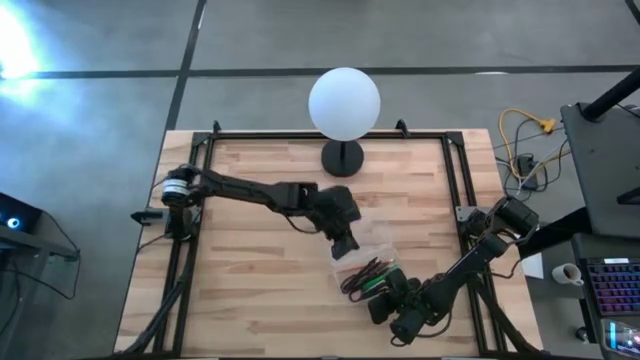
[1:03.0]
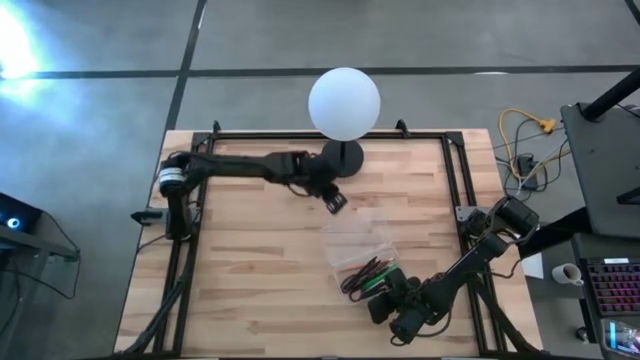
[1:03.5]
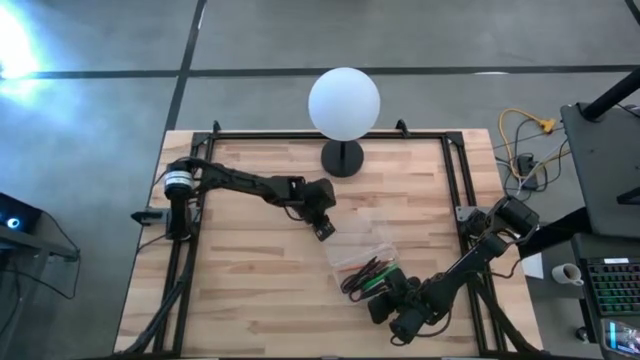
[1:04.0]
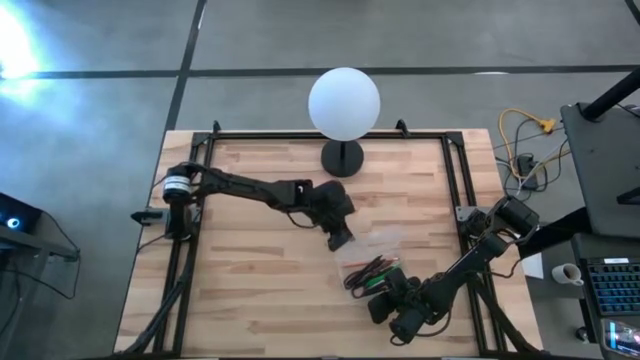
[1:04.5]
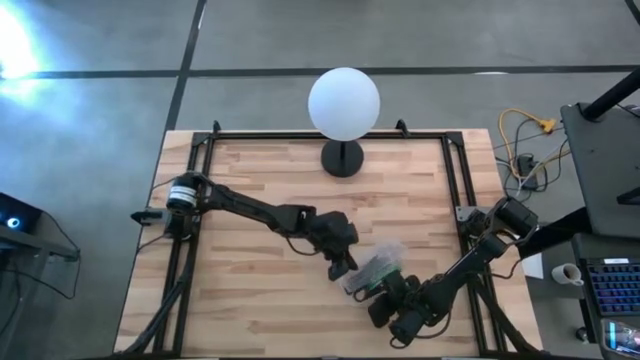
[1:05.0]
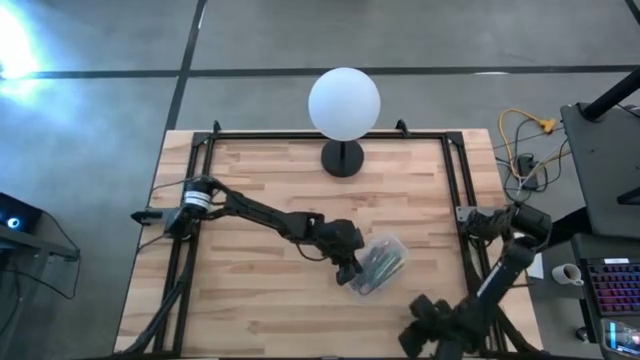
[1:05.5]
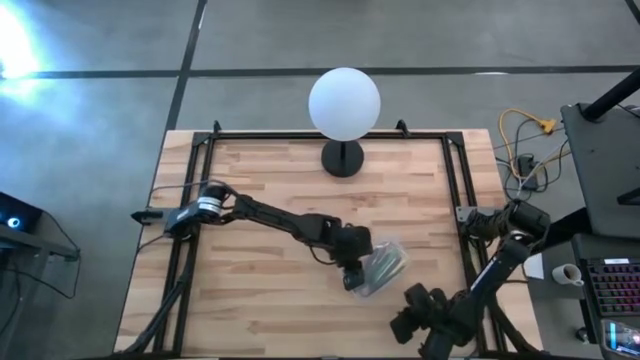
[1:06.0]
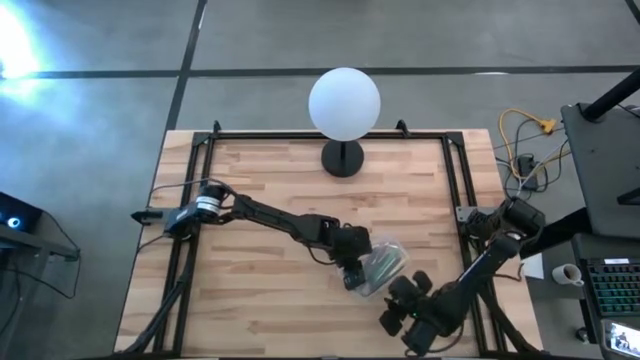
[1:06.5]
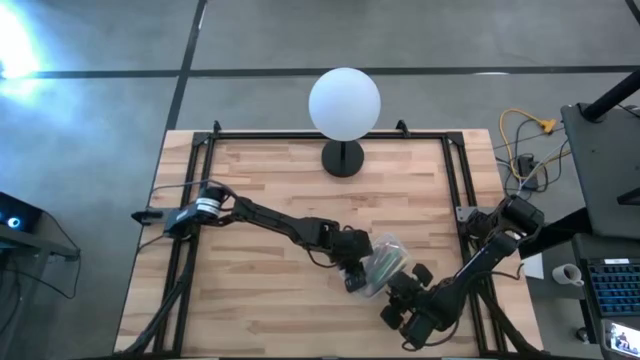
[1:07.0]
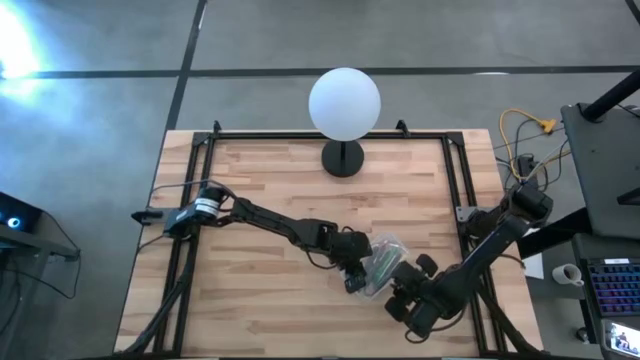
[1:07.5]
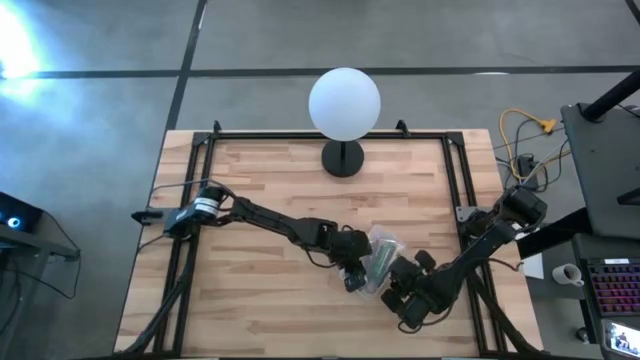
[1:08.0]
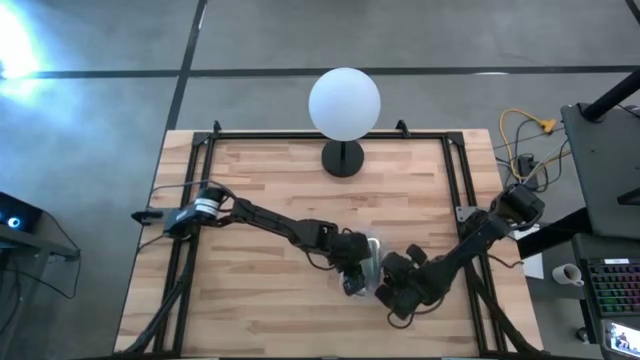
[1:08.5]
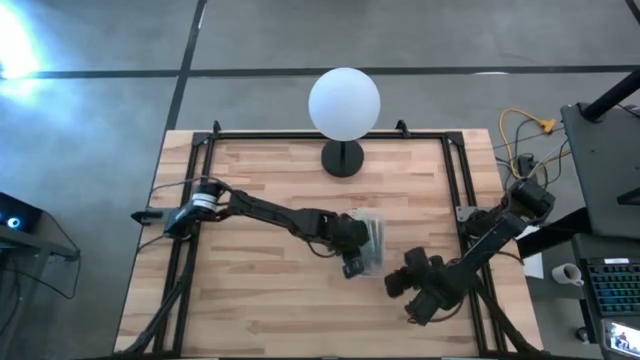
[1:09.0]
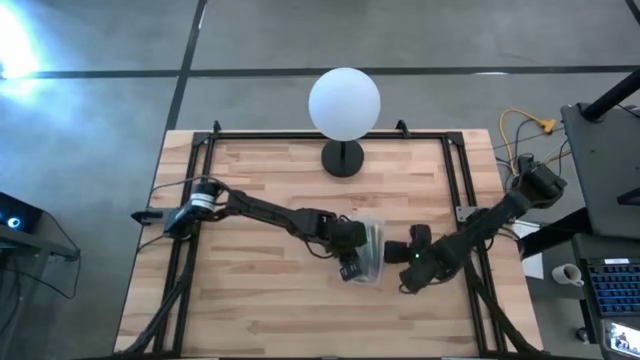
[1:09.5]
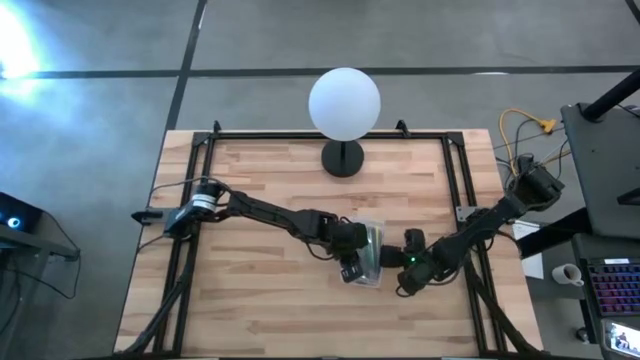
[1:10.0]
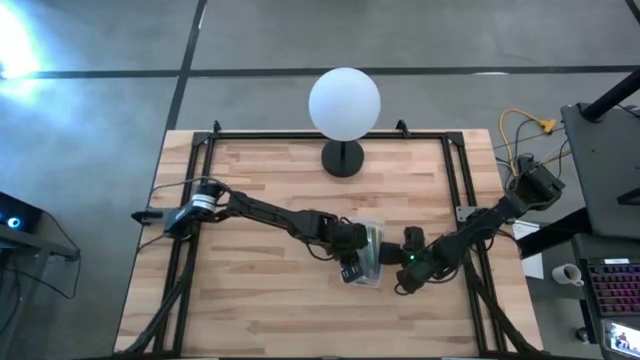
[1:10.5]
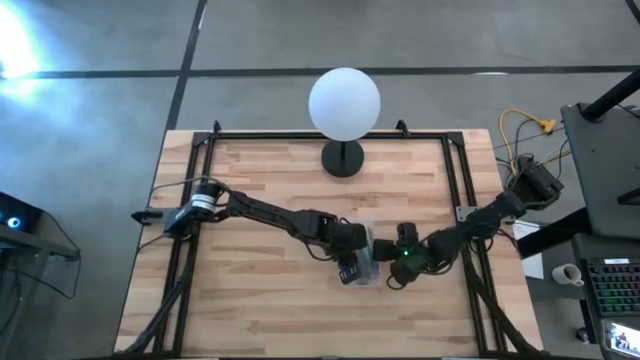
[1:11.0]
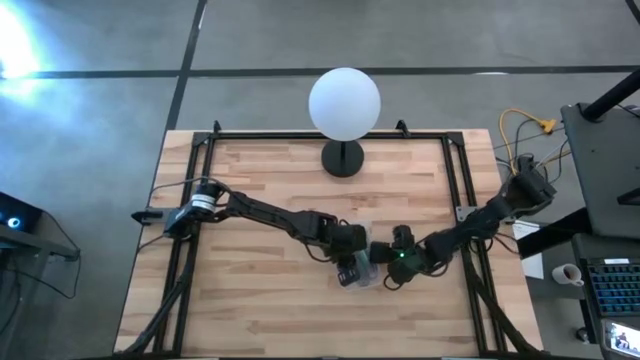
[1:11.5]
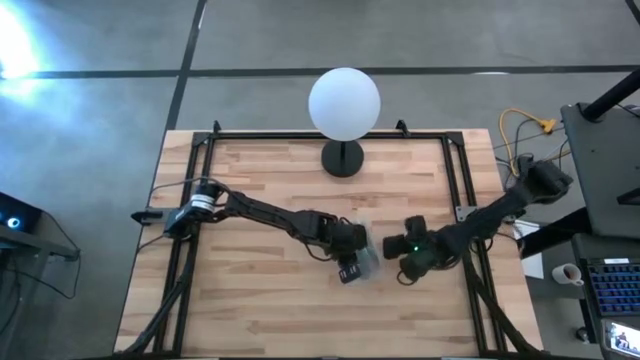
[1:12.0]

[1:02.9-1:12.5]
Task: Pick & place school supplies into a supply box
Close the transparent supply box

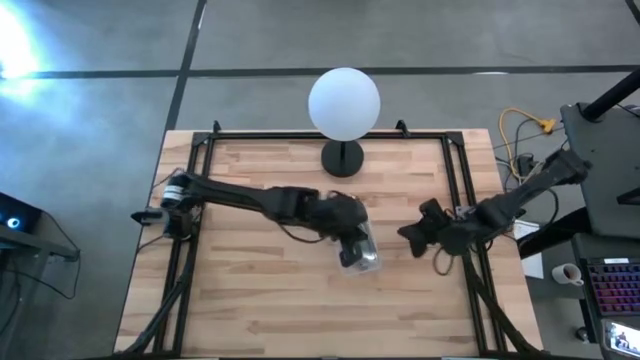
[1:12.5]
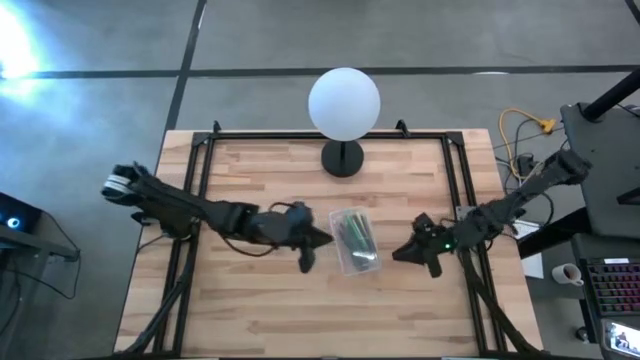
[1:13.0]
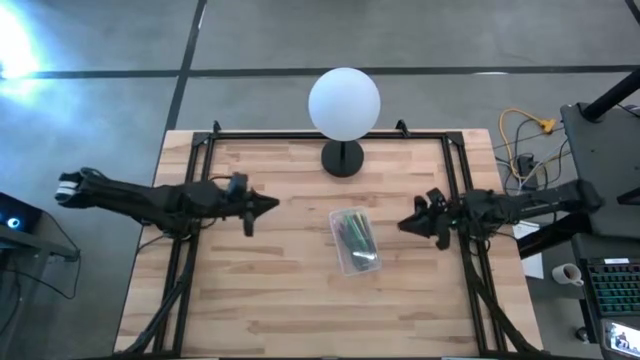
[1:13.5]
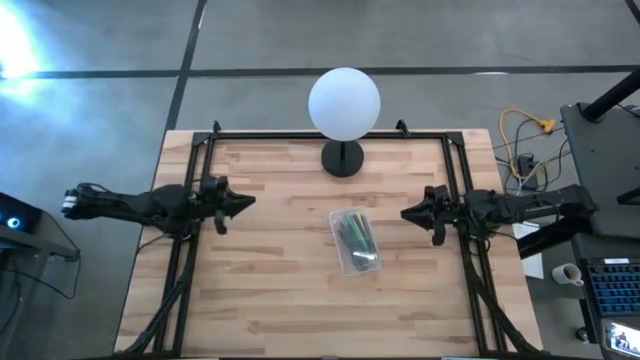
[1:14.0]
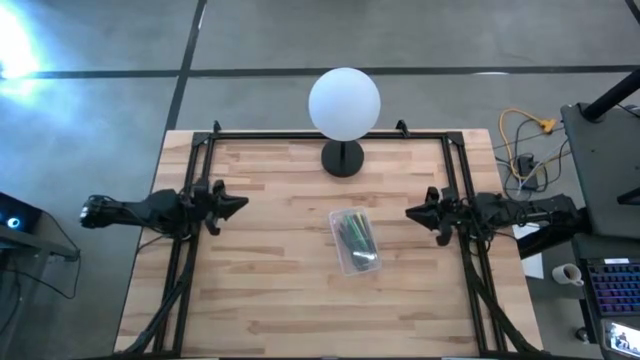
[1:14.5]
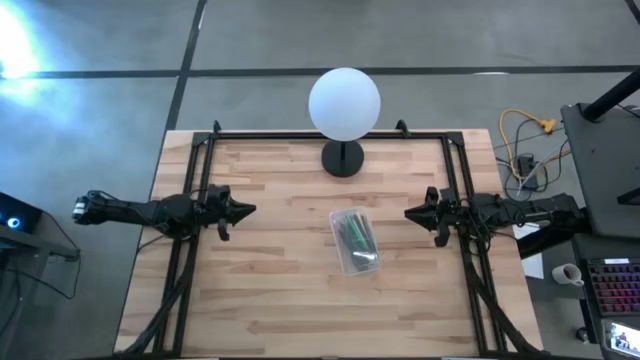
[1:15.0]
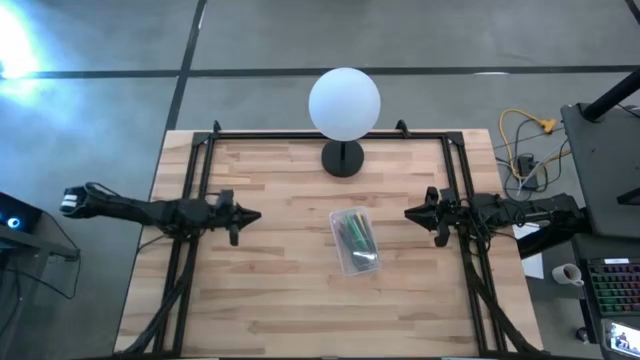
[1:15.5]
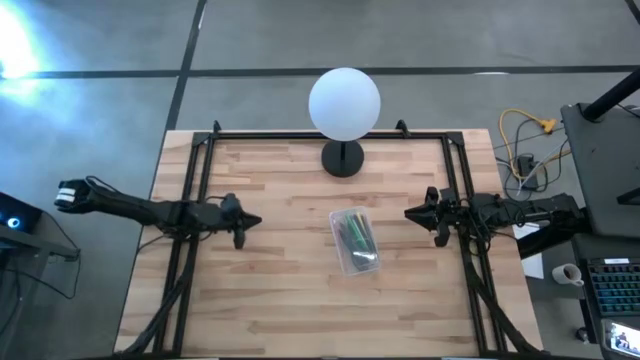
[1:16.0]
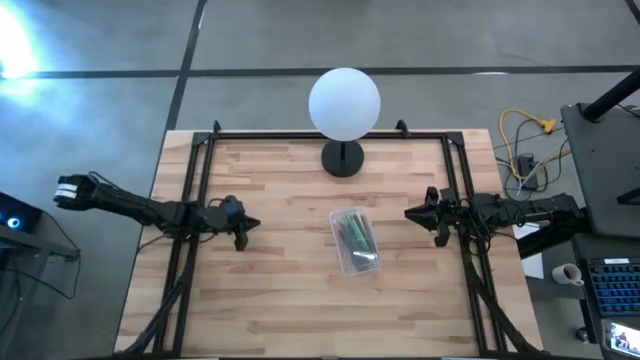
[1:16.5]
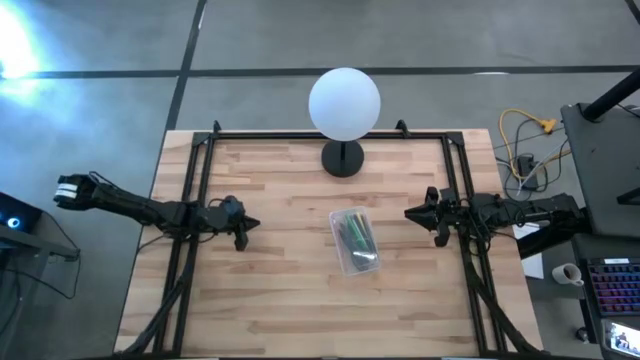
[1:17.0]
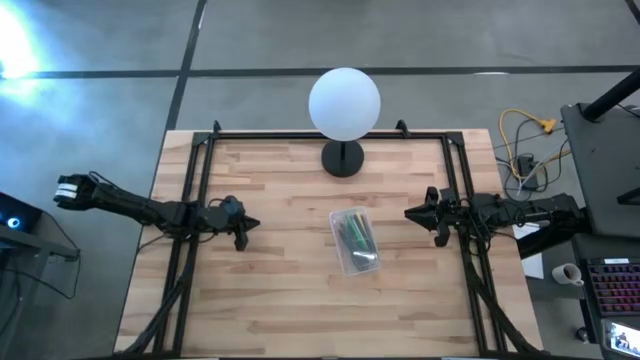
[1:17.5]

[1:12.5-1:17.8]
Return to Home Position
